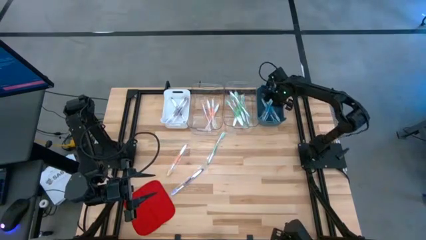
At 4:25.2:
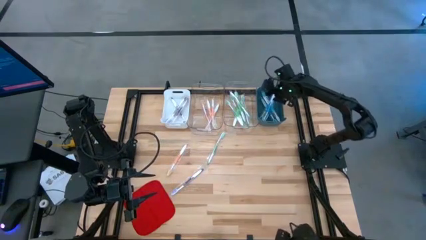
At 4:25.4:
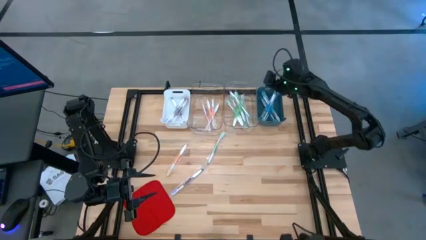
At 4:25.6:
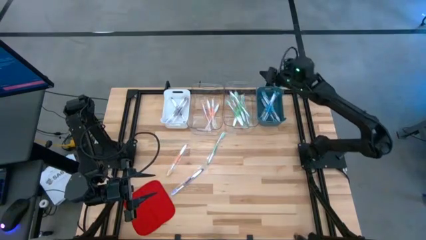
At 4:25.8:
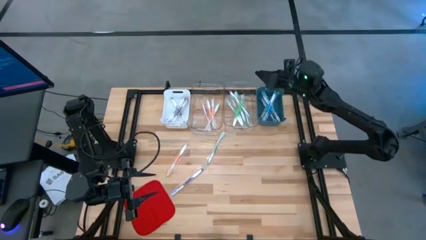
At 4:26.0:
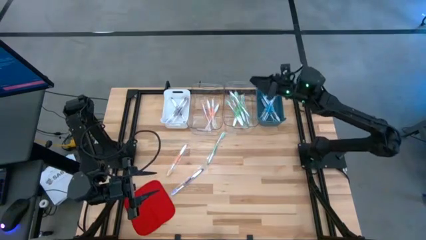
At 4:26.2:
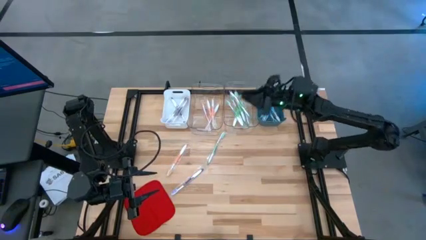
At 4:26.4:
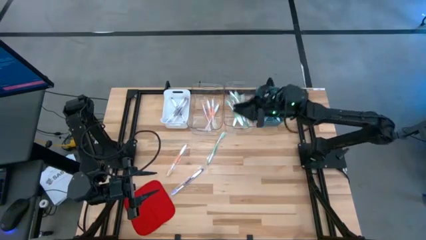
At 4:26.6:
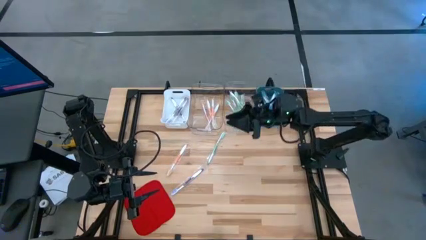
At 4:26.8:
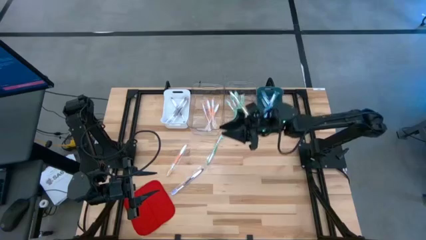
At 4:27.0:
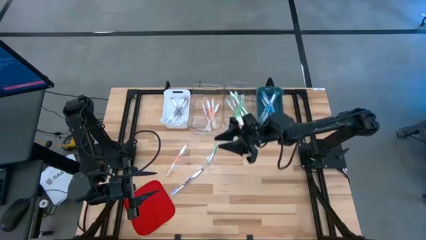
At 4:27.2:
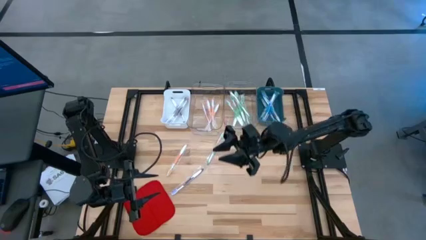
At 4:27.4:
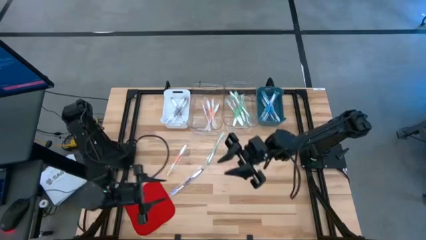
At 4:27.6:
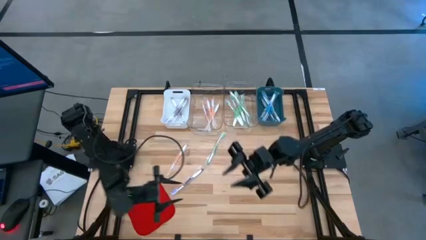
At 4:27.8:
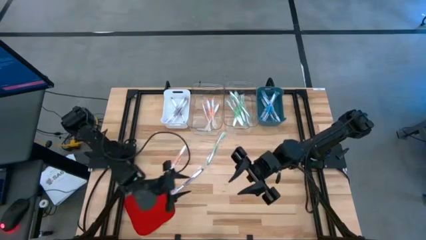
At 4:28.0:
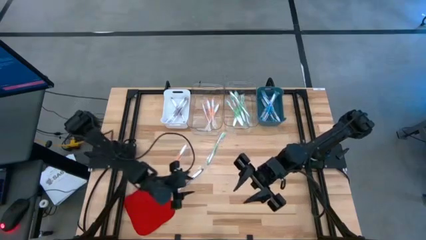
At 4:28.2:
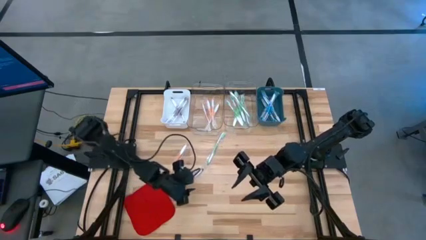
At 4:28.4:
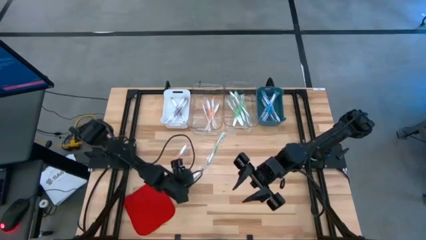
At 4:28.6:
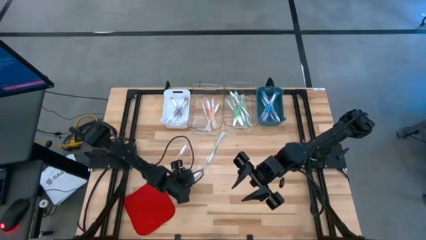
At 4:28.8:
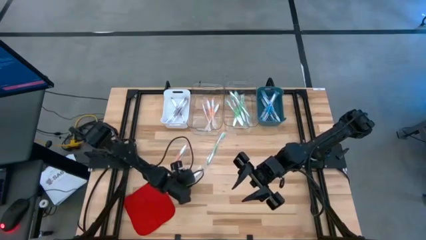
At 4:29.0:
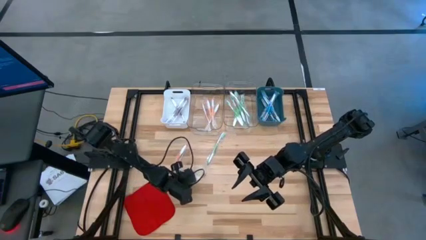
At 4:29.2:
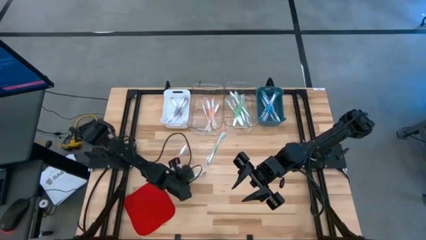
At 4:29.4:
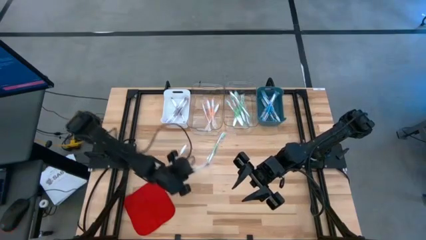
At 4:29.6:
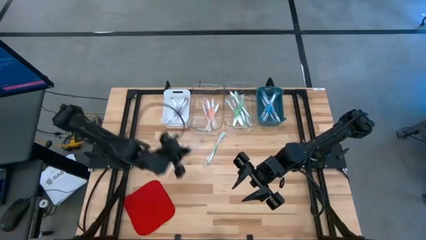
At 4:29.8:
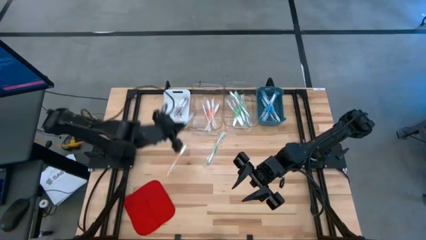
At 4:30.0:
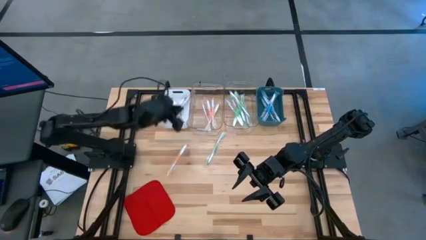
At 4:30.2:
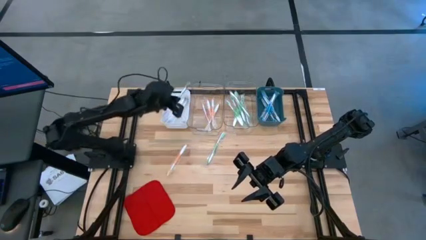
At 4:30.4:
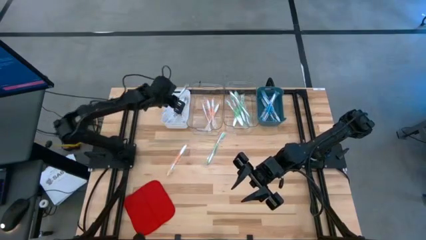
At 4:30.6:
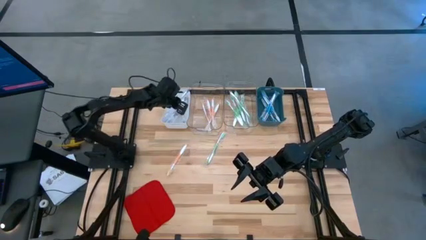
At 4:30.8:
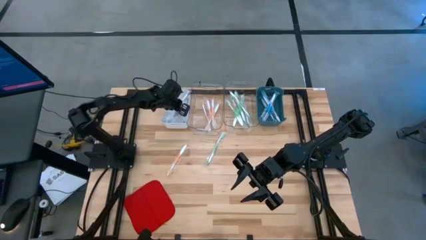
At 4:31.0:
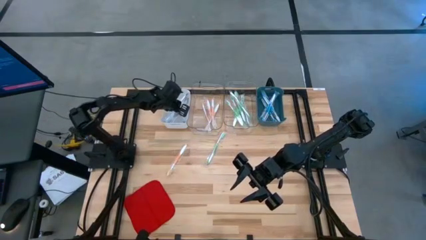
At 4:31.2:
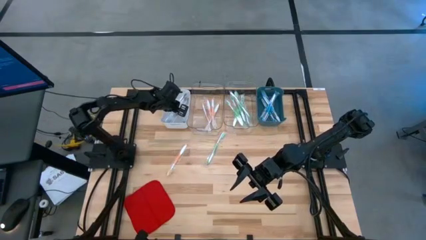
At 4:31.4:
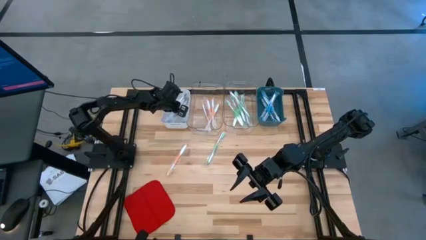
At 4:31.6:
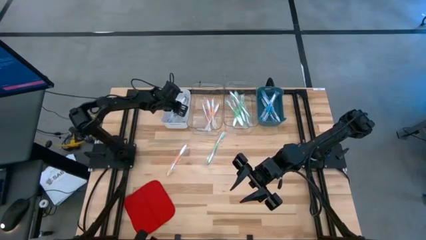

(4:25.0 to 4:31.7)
Task: Pick & Place Toothbrushes
Put the violet toothbrush into the white bin

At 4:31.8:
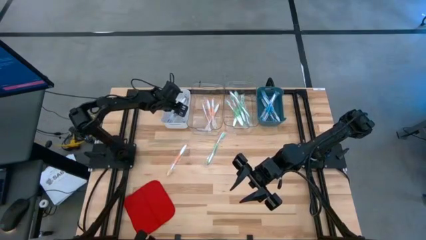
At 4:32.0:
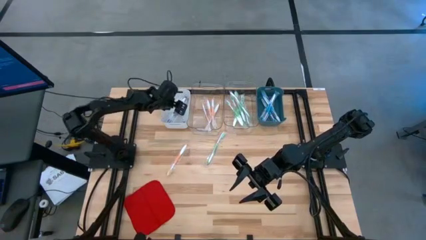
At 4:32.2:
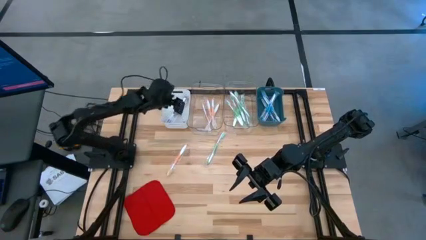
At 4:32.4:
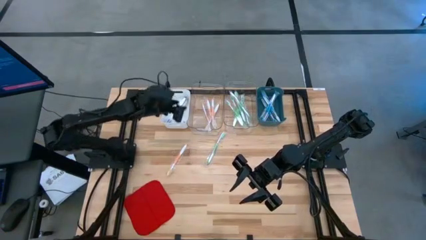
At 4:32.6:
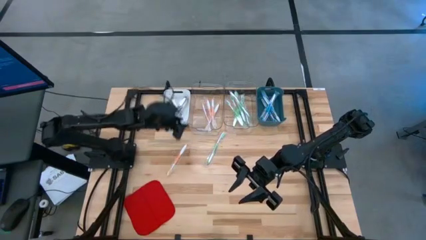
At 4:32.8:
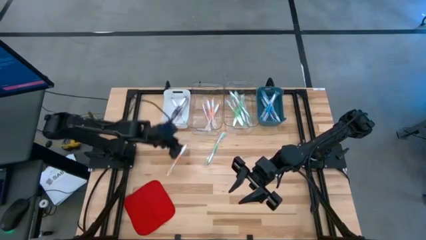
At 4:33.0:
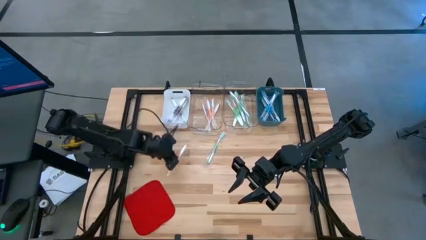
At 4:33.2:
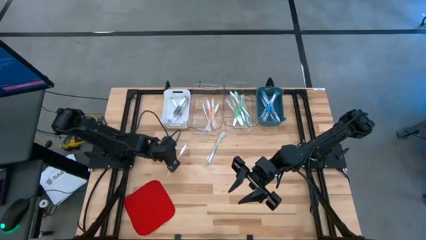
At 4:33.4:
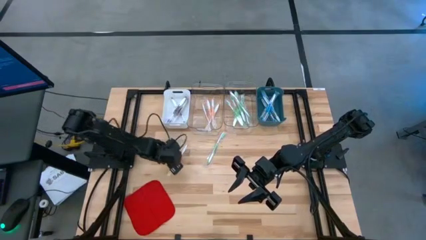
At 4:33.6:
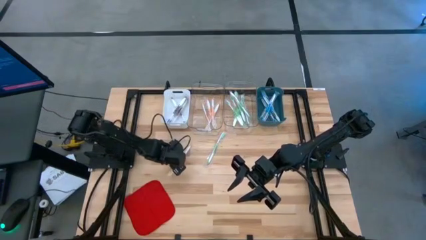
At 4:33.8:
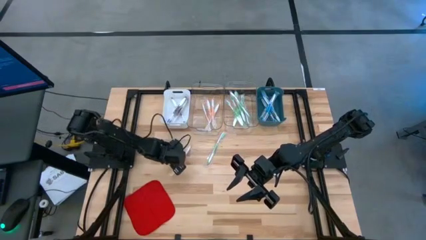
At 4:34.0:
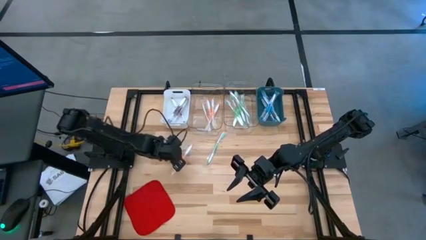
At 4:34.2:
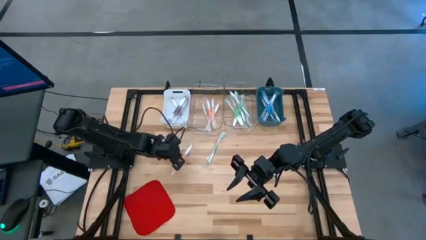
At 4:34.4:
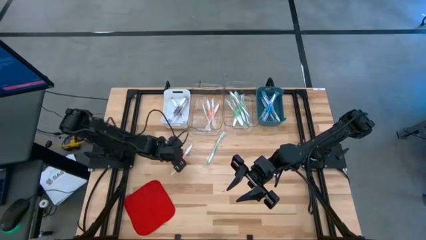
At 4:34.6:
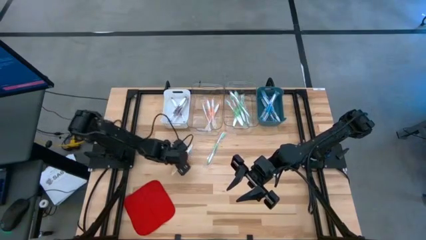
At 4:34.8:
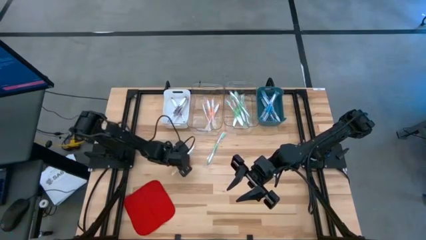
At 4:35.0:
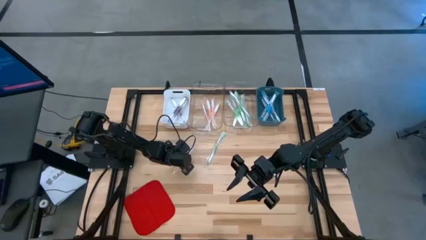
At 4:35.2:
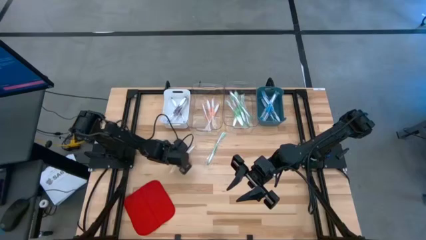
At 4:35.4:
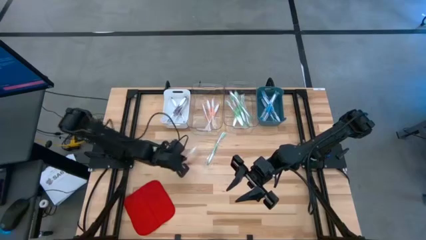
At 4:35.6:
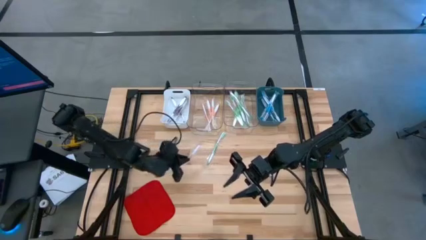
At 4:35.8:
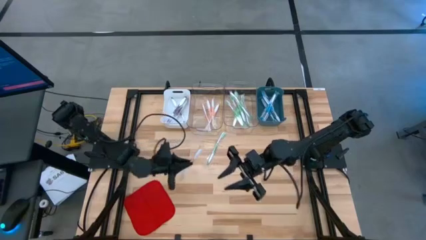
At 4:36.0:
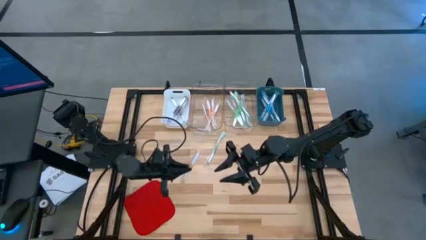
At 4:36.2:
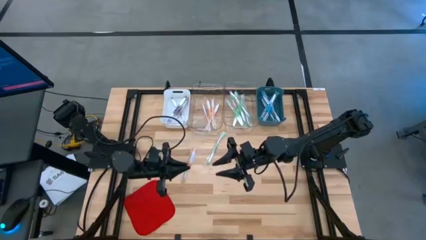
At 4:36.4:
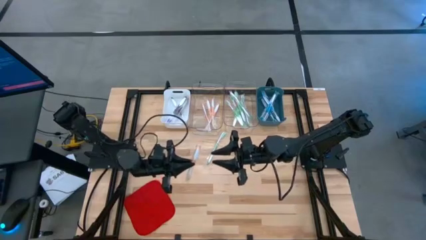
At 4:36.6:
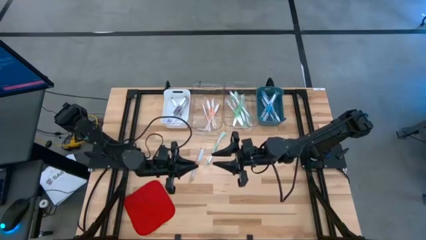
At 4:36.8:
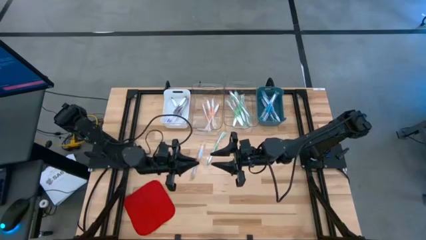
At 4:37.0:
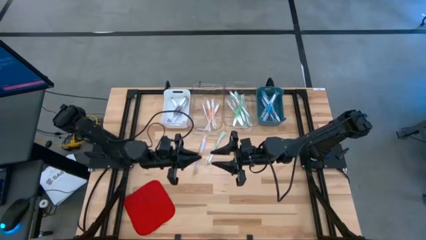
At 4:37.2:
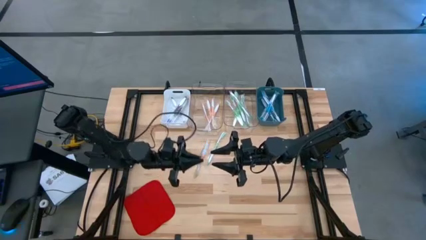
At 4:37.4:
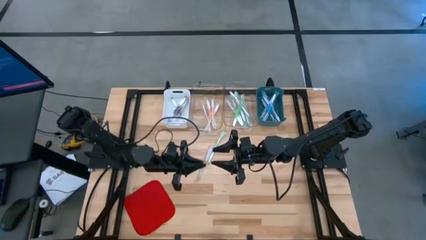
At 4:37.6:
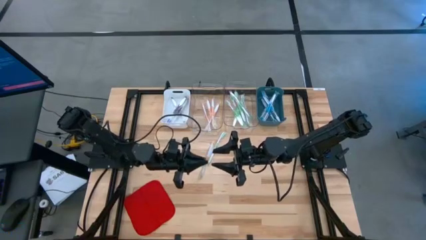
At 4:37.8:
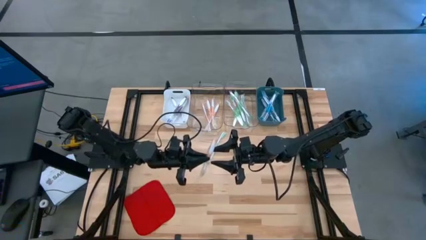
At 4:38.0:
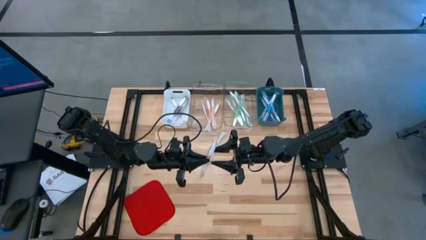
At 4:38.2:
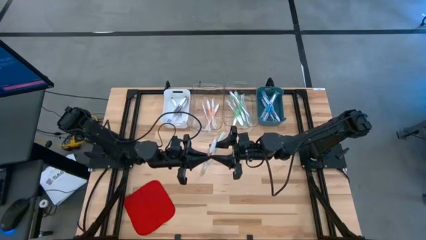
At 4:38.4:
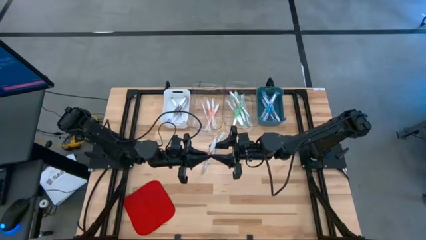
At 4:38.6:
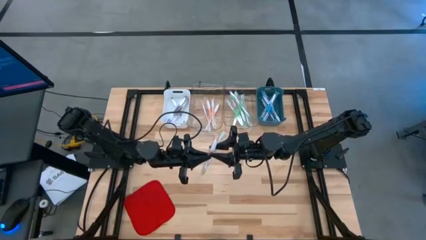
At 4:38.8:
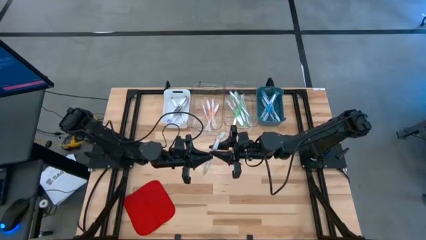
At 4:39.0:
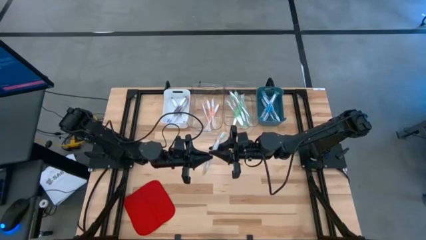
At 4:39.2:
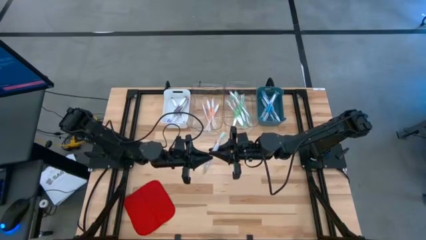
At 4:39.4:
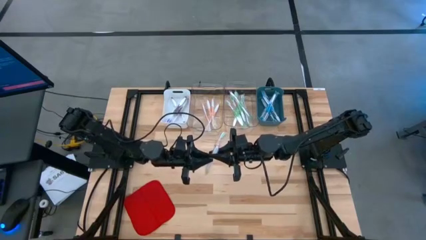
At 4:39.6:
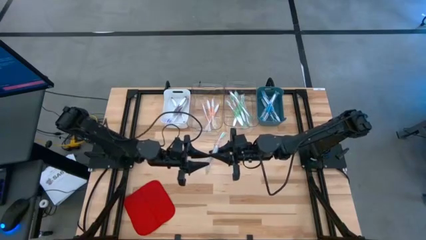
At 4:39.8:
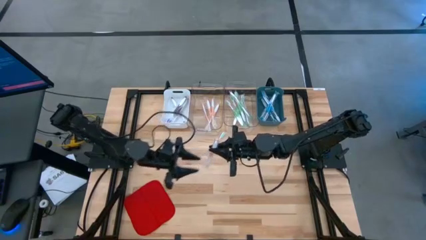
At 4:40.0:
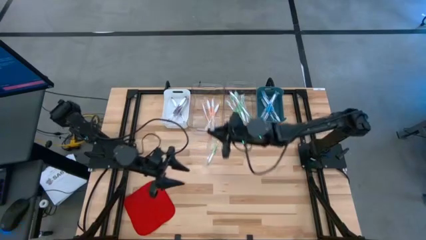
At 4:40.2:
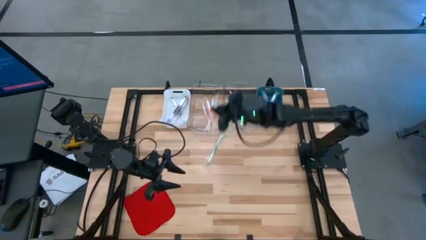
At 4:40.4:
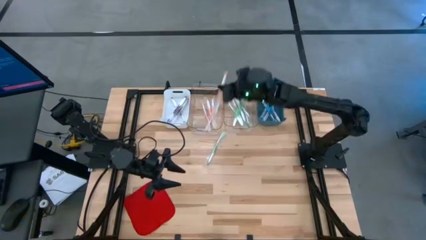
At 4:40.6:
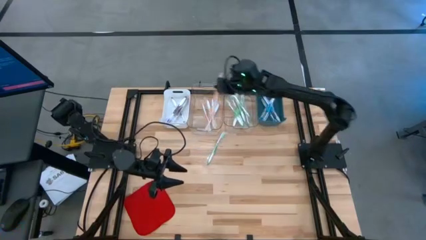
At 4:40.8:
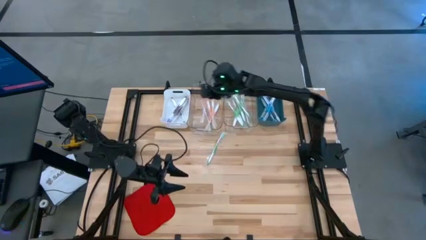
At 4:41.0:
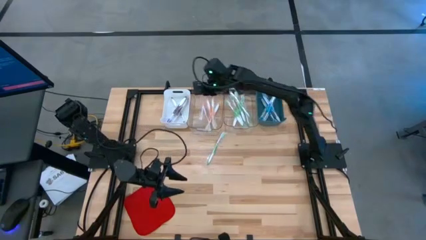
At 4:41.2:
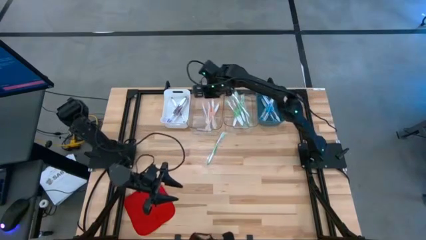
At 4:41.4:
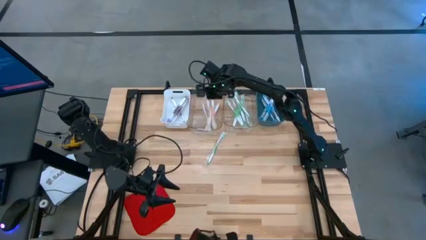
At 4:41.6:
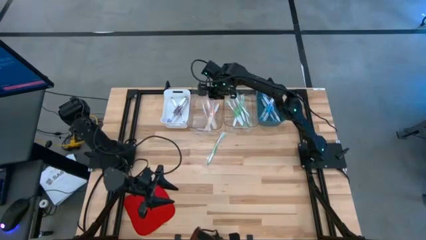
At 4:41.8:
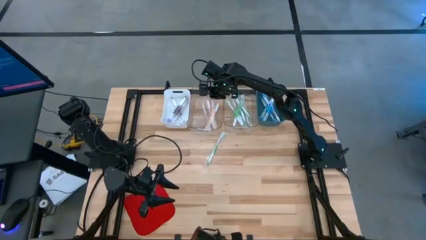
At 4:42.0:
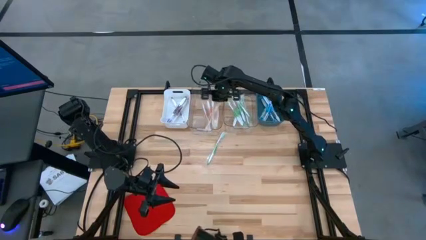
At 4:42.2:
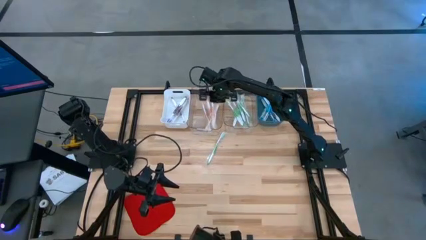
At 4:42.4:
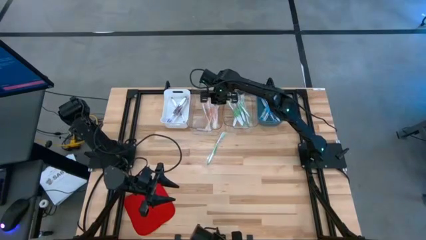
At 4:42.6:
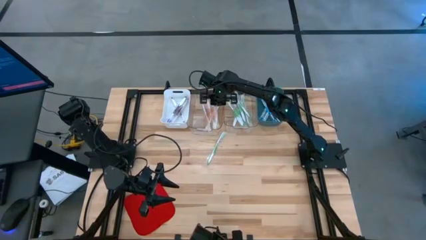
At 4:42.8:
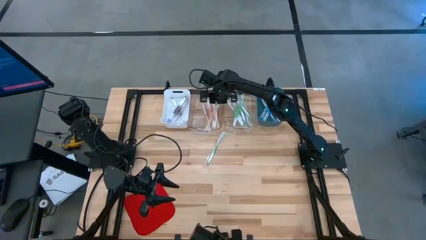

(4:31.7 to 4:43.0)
Put the orange toothbrush into the left transparent bin
